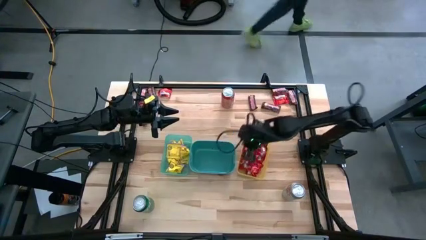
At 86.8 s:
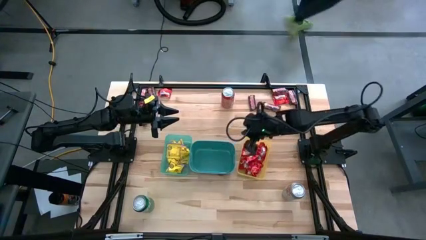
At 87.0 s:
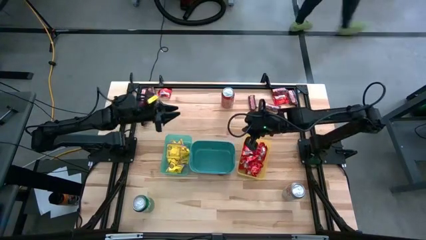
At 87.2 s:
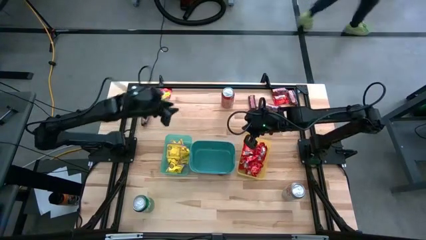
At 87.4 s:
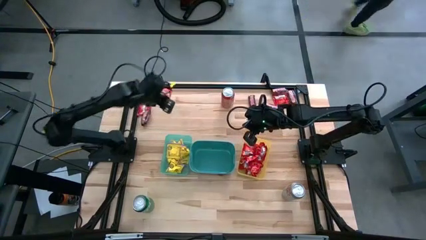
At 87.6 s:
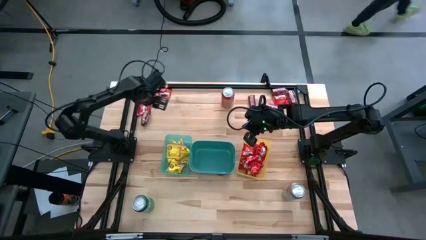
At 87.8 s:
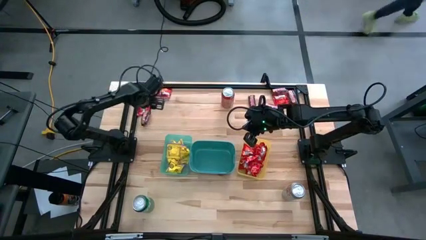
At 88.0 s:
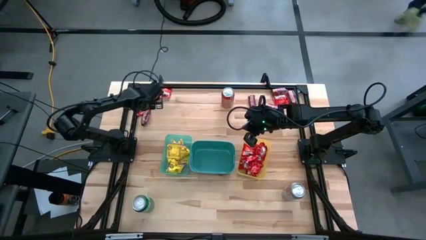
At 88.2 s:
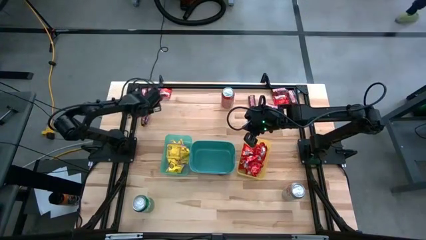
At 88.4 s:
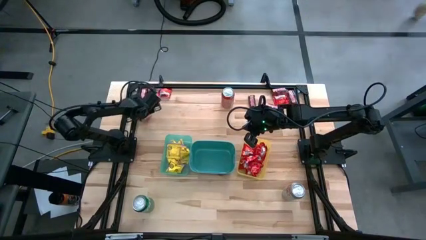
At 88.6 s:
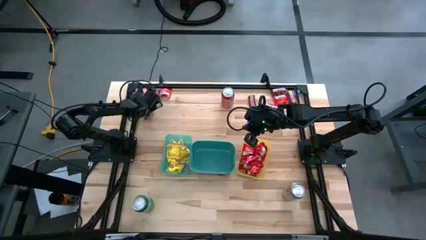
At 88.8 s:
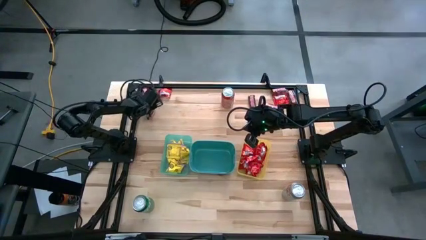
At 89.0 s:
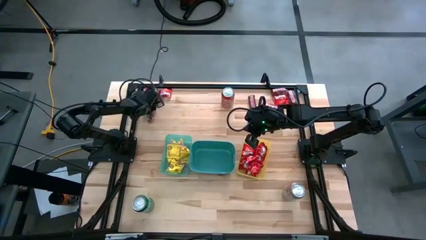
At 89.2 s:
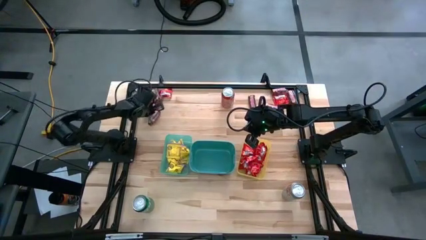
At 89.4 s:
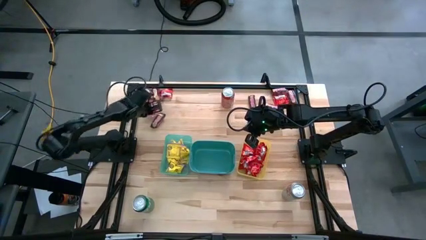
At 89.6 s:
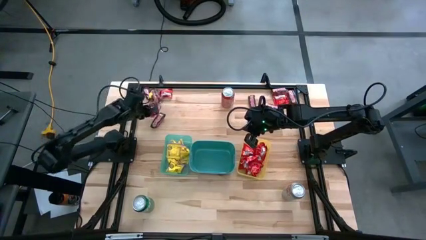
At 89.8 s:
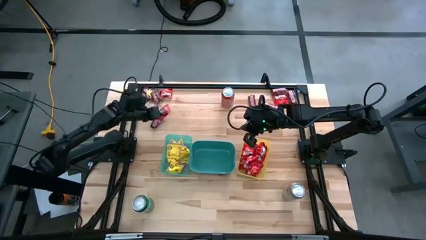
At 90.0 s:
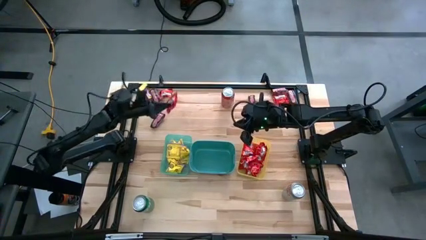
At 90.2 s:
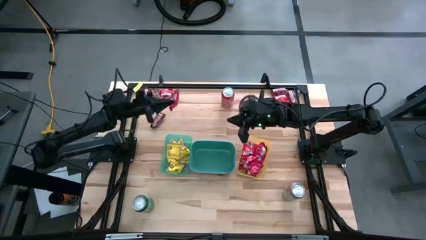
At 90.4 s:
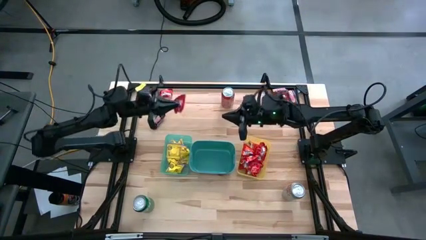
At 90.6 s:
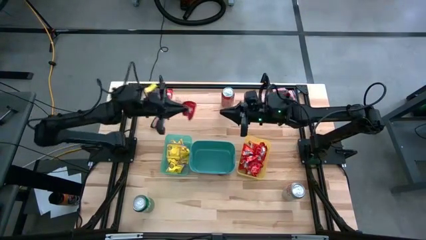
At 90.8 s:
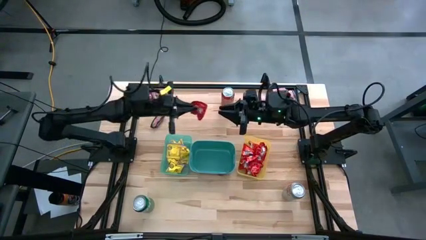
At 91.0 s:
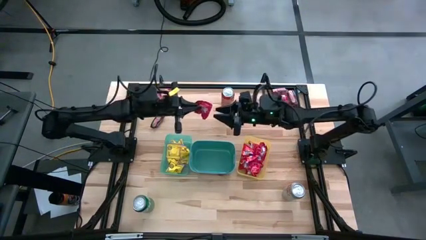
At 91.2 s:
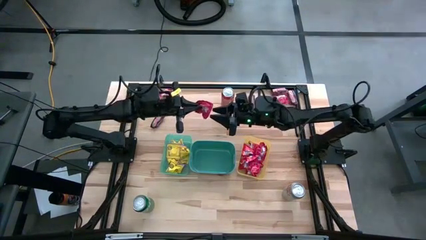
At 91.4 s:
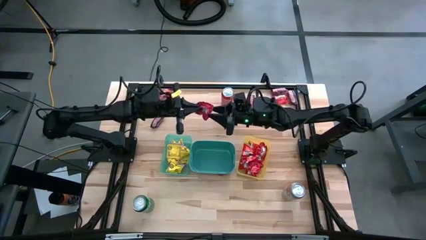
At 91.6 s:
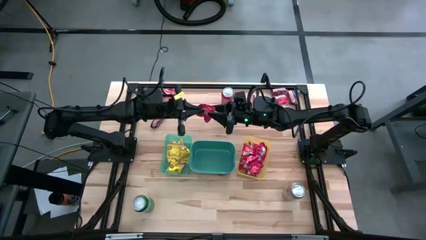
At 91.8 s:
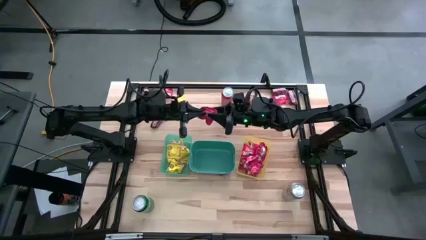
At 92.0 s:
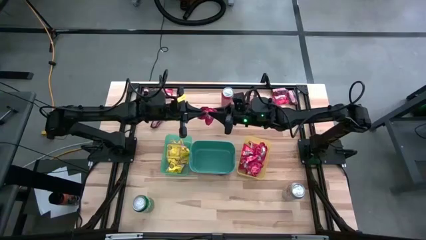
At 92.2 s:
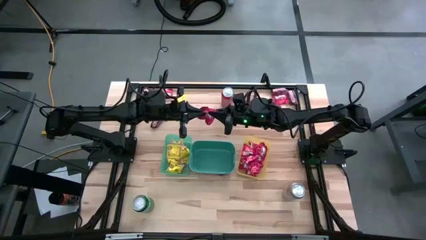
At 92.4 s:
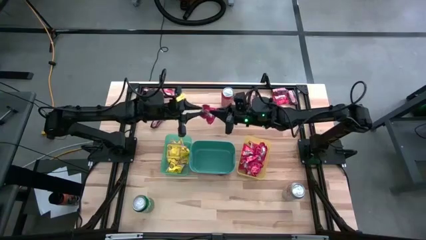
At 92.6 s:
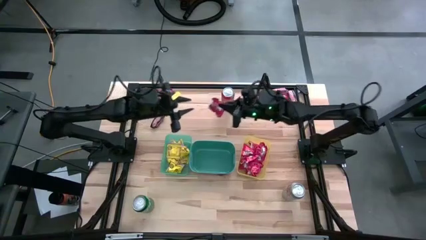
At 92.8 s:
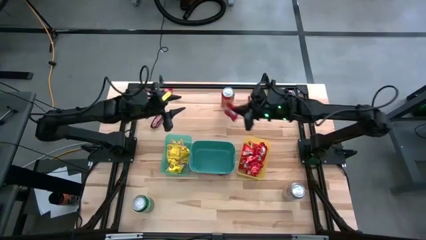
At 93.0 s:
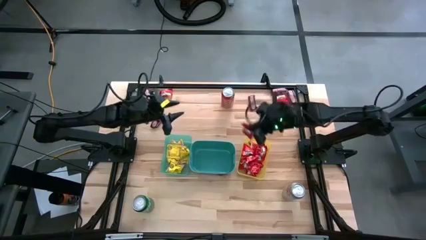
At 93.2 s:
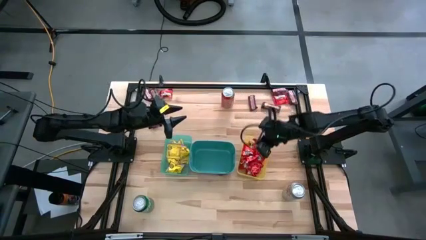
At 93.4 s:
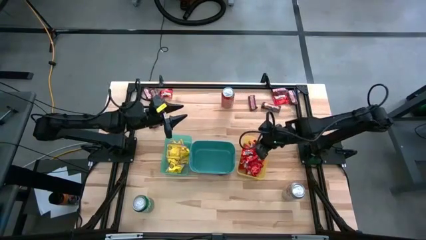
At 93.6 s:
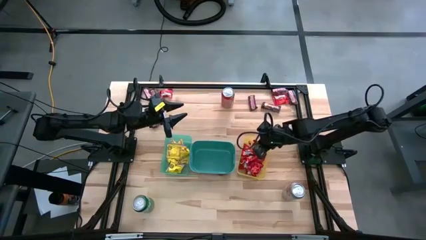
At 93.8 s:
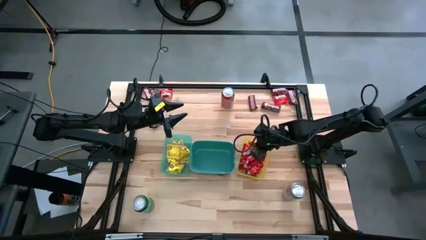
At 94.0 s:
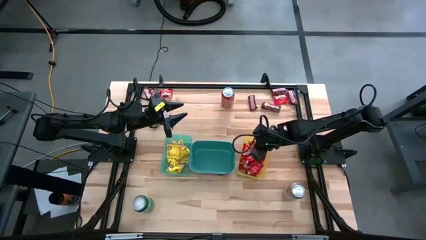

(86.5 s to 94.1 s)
Task: Sort candy
Put the red candy into the yellow bin

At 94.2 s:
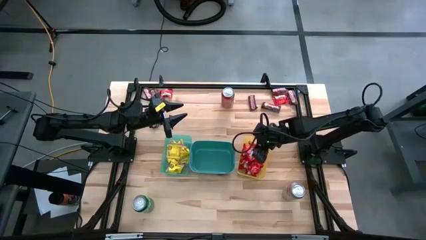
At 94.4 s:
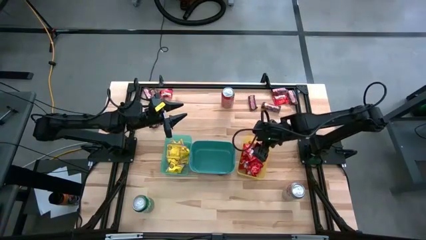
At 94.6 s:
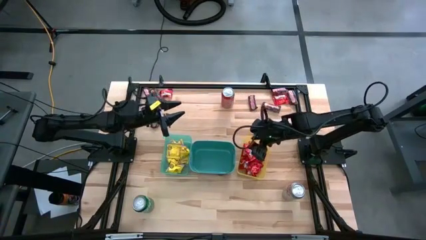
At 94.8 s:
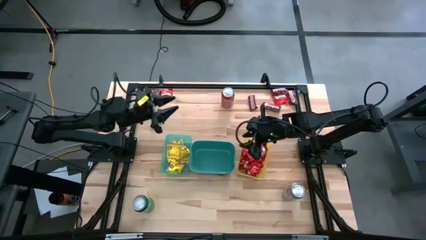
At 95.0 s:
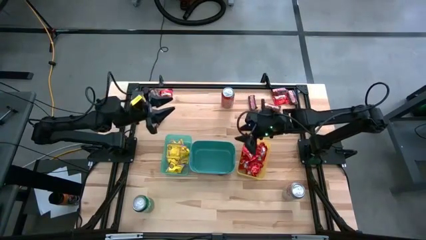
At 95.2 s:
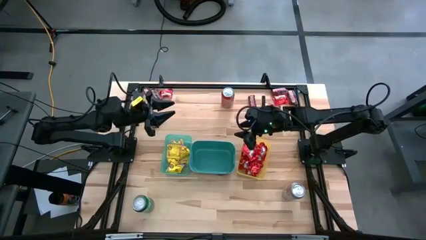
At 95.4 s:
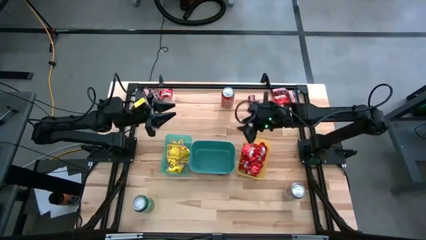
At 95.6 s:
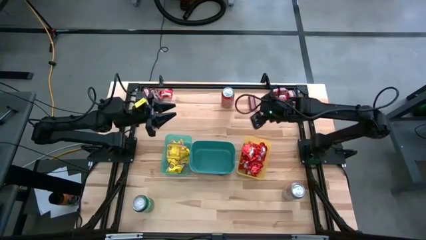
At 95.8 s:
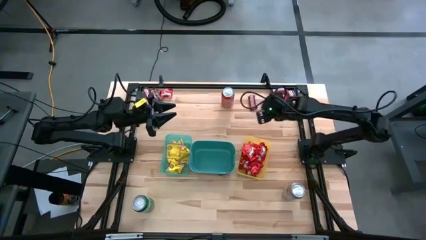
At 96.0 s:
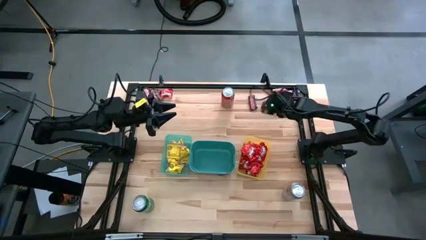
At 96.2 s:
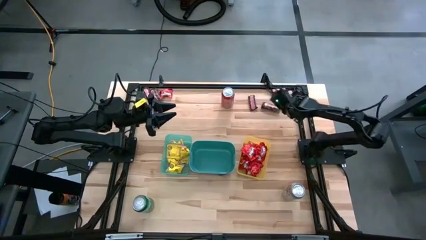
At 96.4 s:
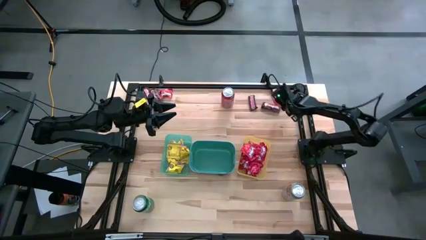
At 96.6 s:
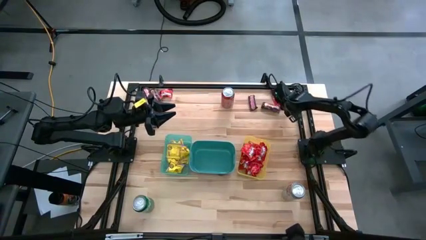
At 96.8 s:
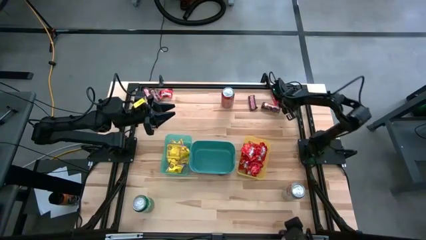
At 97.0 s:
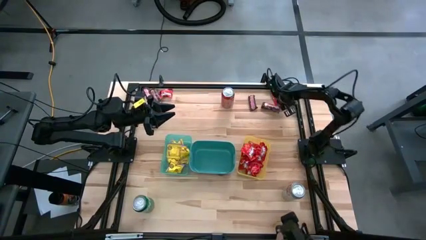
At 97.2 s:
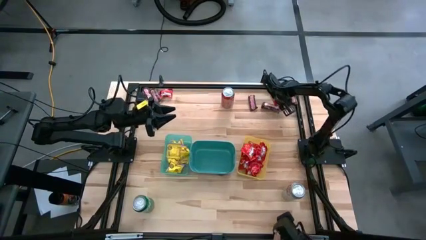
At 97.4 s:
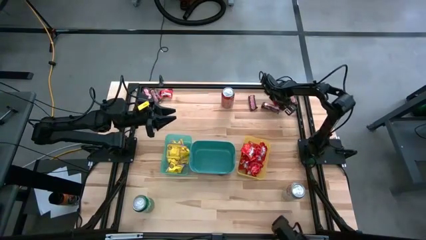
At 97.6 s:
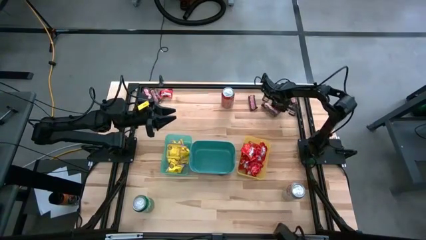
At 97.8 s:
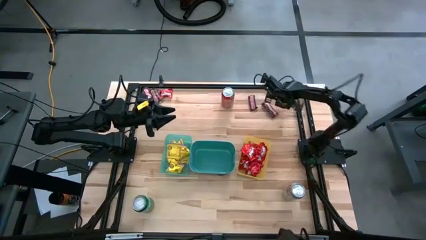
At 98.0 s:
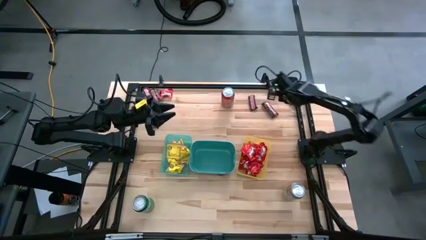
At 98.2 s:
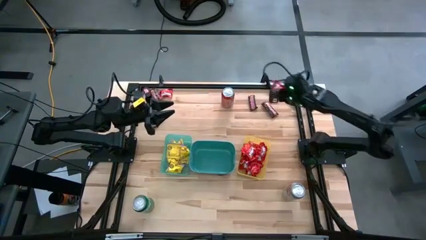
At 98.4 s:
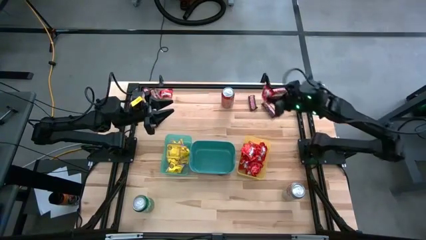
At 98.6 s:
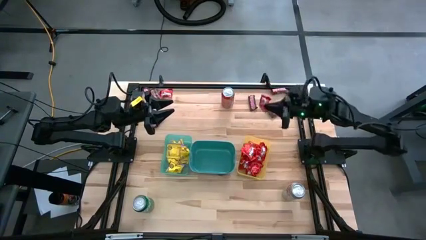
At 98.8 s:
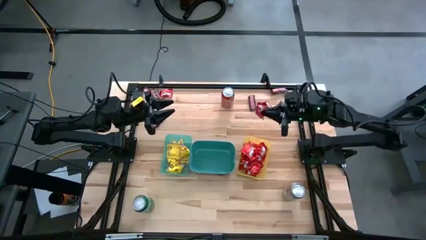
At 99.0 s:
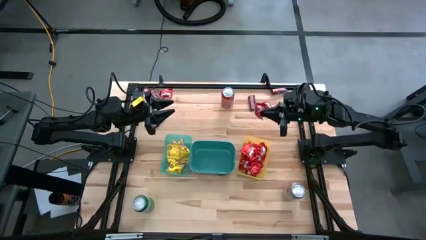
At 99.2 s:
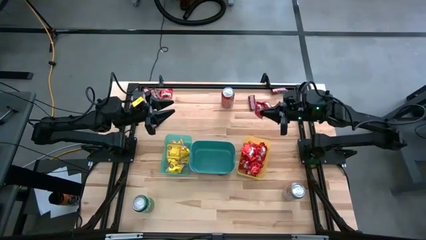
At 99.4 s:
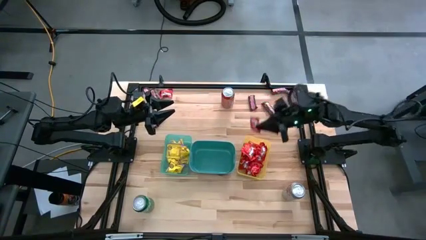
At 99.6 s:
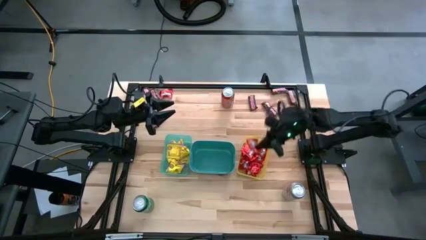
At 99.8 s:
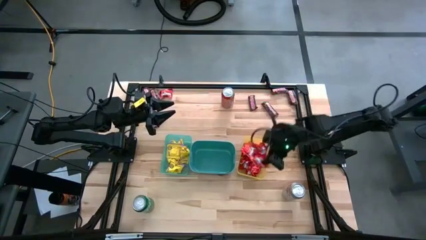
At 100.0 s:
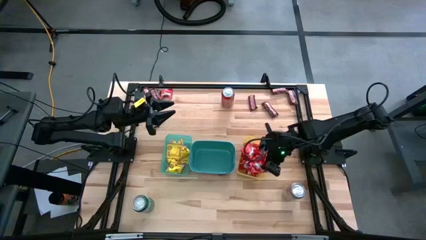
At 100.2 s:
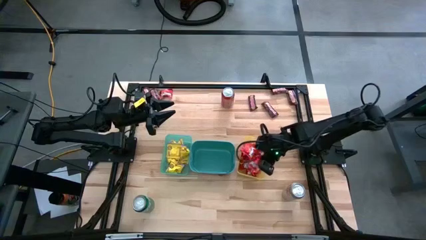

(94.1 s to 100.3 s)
Put the red candy into the yellow bin

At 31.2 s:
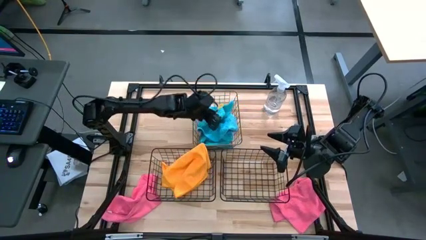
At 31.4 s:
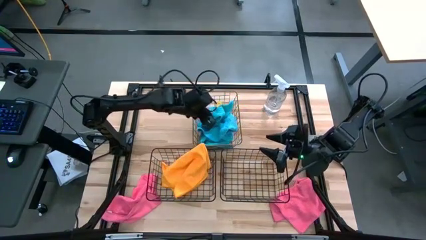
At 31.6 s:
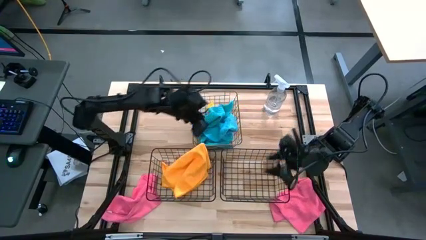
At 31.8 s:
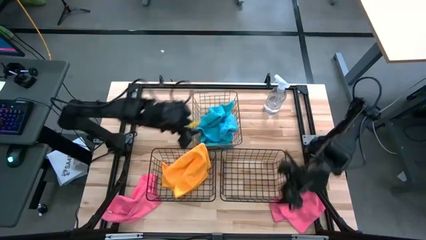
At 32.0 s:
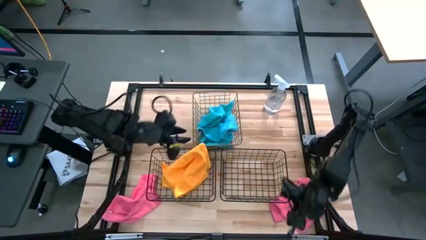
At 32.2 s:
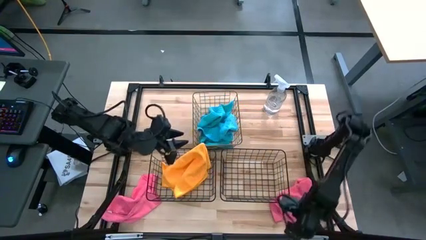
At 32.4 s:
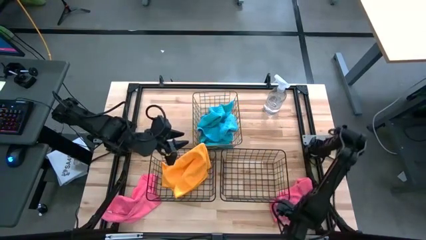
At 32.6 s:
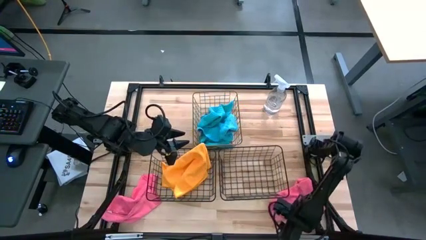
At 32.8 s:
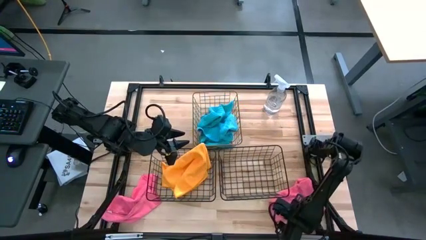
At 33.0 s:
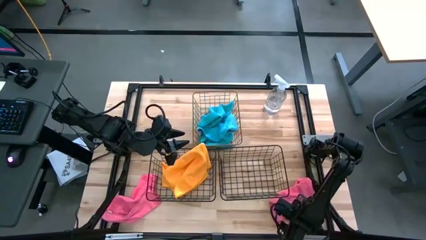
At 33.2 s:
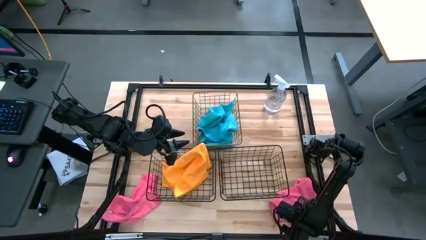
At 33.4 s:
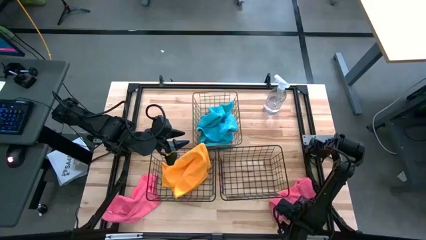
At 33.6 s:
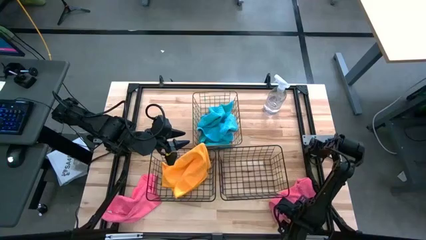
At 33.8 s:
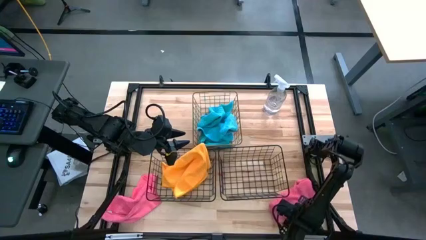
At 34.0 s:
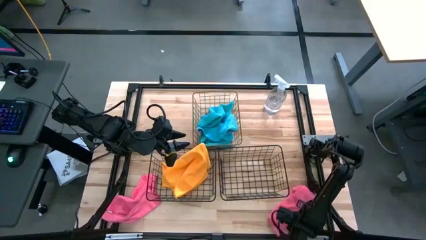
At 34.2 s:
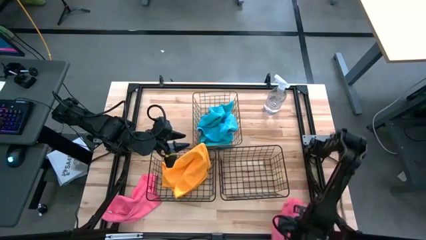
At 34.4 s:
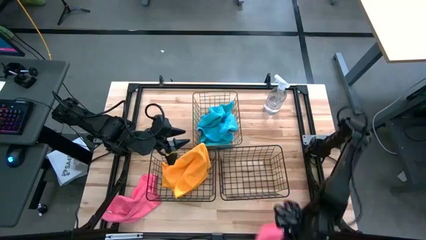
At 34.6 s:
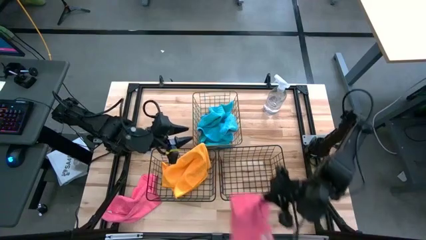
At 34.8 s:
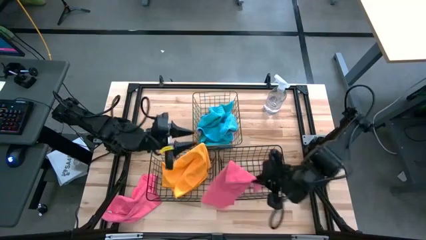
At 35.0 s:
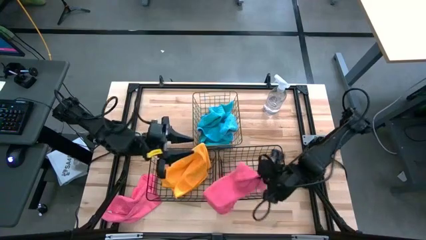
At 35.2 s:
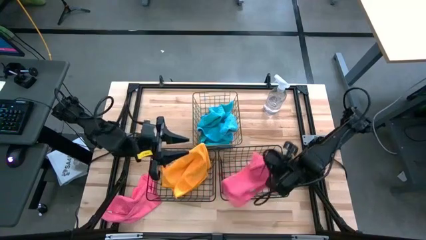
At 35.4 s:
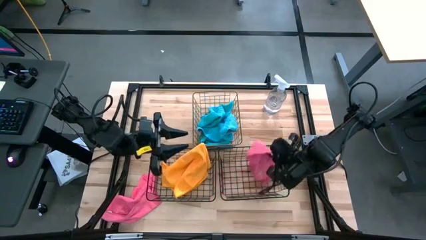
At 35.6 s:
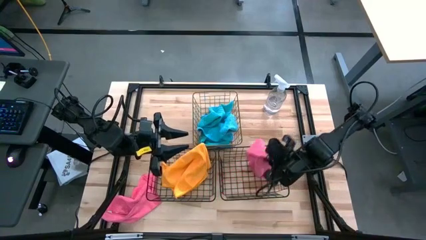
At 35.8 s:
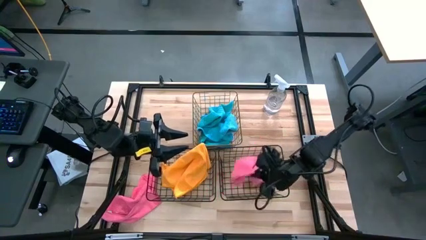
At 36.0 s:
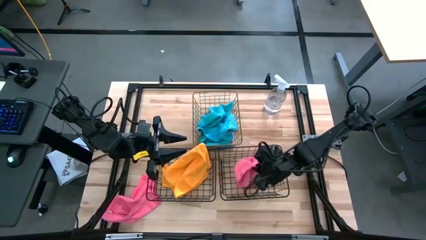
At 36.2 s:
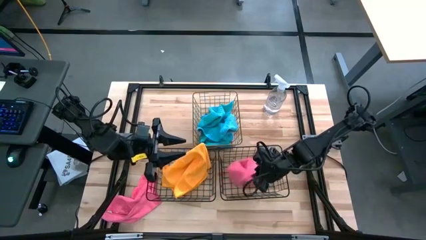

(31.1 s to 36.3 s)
Task: Sort microfiber towel by color & place in baskets
Put the pink towel into the bottom right basket
